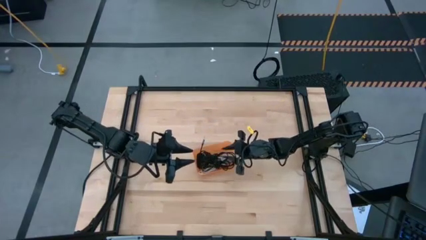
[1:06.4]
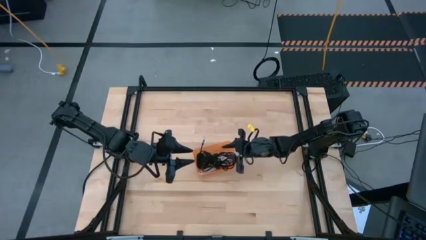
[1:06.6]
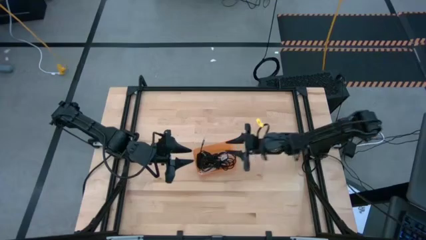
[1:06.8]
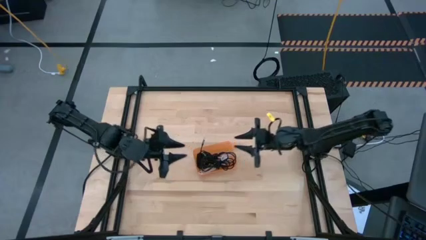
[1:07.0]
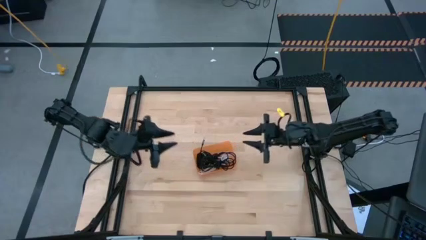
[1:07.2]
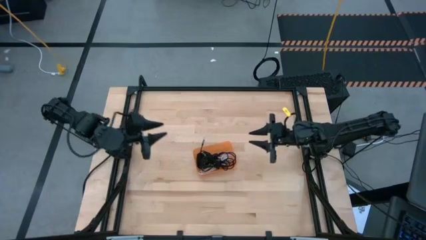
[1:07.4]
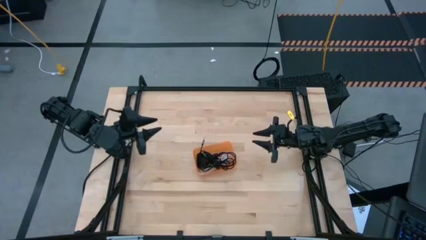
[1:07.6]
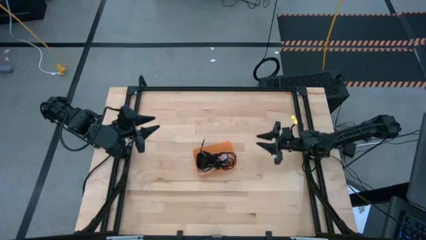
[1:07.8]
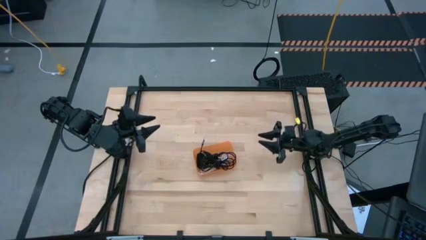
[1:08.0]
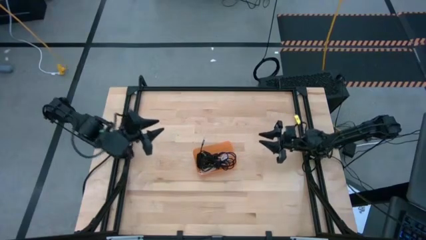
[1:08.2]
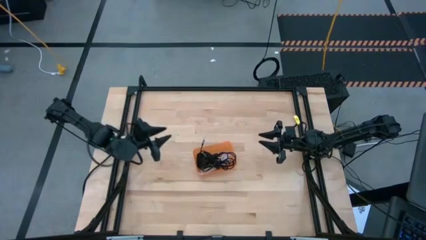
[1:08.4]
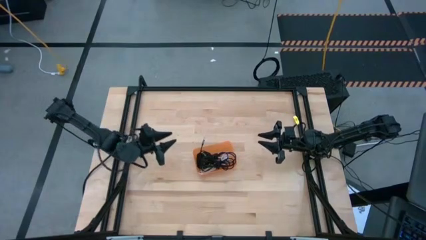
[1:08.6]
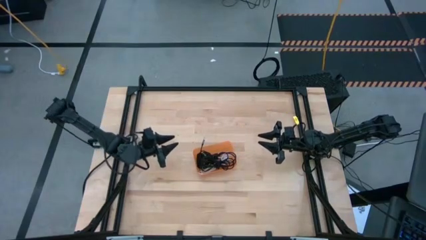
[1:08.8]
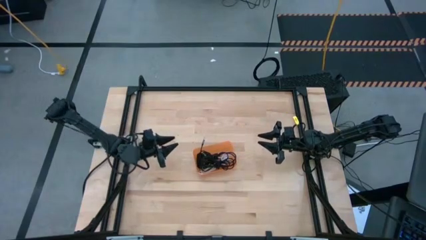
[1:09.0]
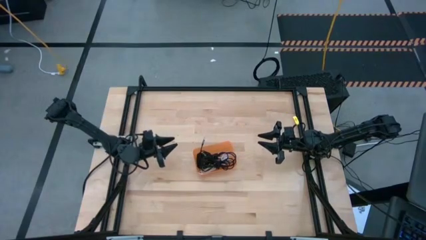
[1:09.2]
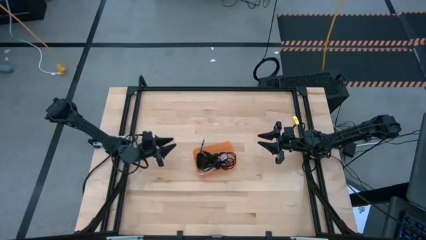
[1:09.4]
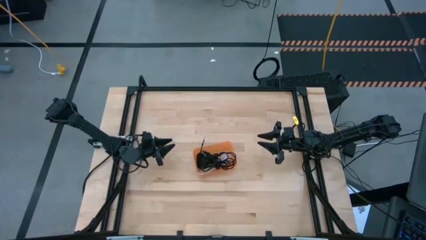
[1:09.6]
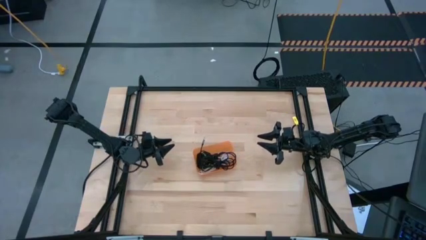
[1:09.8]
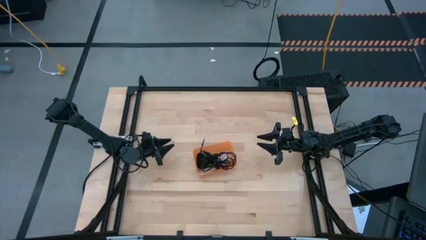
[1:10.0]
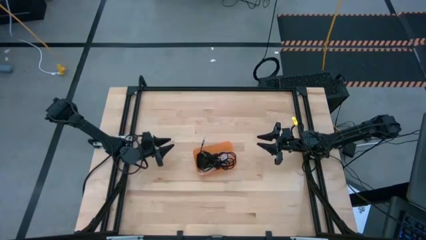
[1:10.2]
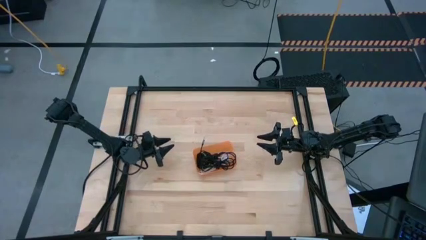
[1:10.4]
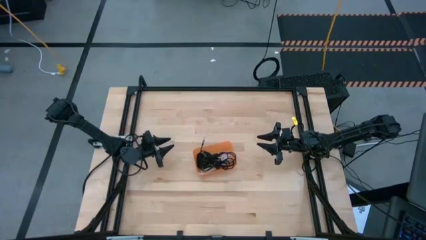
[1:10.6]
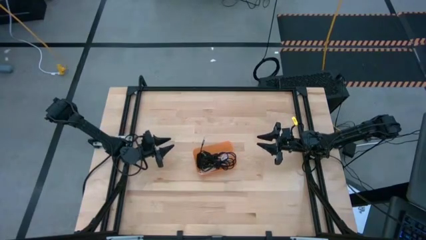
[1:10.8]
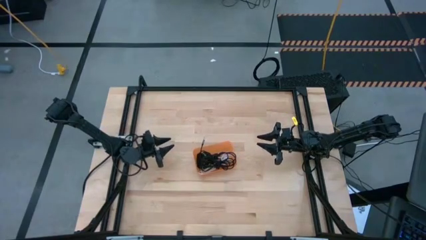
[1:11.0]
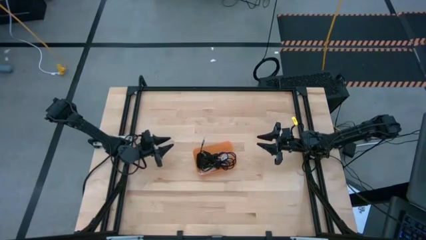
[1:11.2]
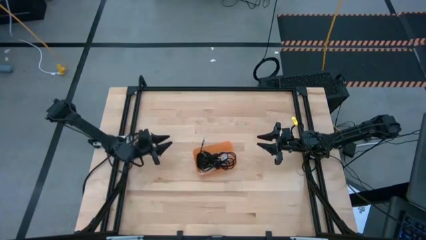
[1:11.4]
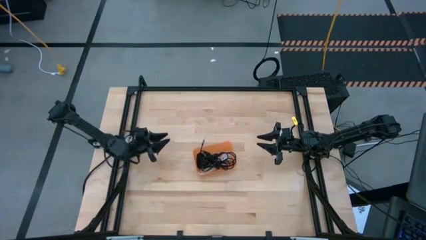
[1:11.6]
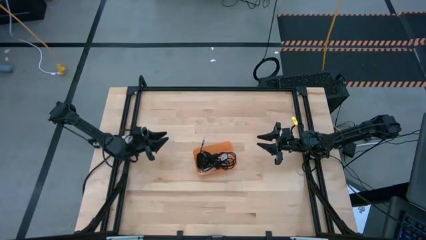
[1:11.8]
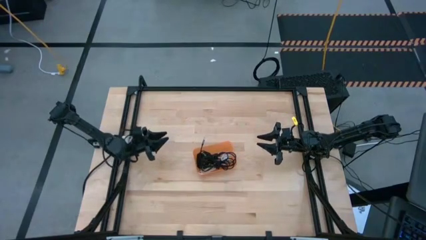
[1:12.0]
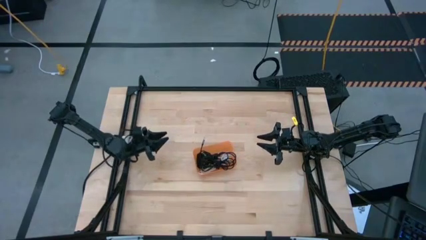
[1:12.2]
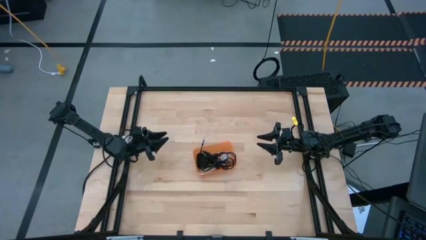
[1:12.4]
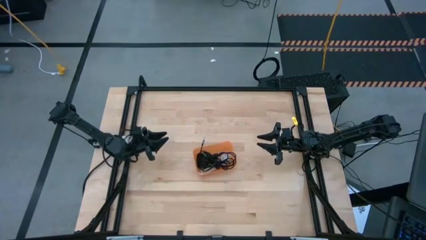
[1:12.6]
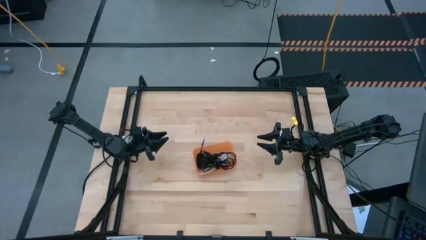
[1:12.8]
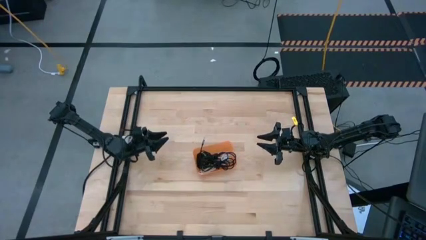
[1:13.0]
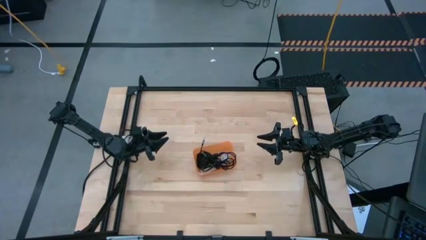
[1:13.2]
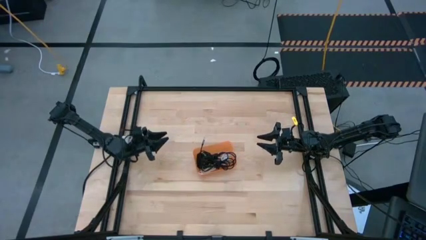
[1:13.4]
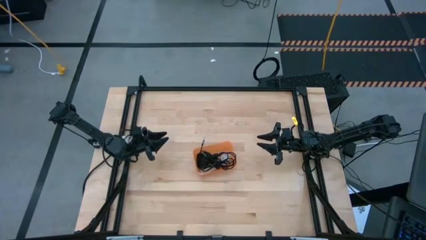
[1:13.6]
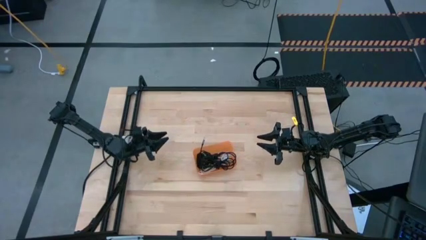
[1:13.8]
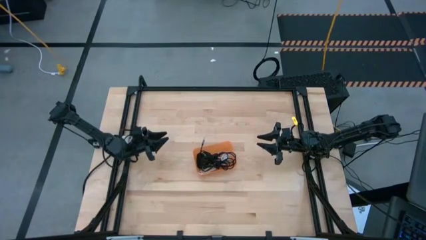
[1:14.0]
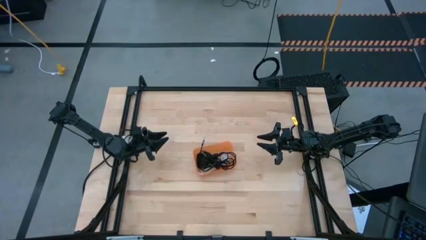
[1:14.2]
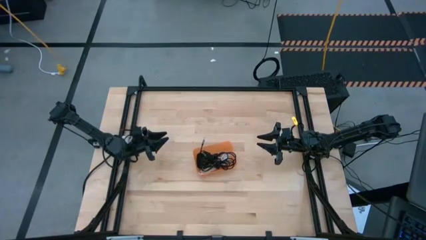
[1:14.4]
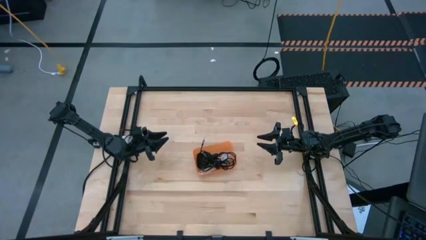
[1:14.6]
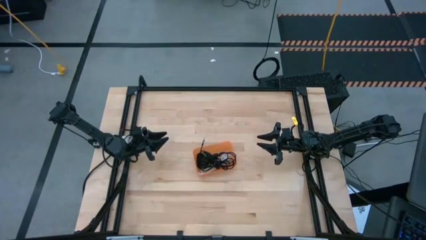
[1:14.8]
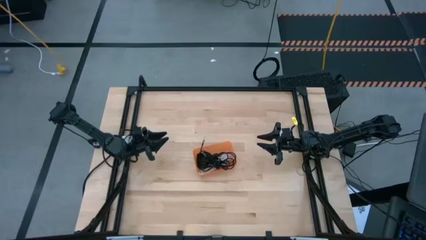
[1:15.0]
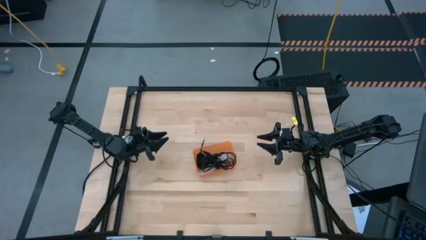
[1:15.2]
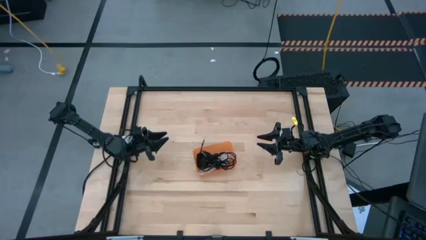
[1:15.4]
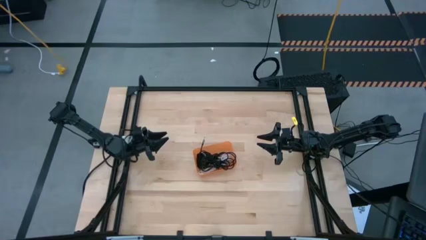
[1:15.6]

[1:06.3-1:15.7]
Task: Pick and place USB-C Cables
Return to Home Position
